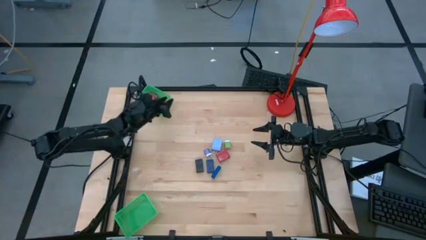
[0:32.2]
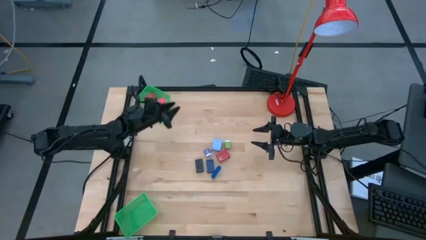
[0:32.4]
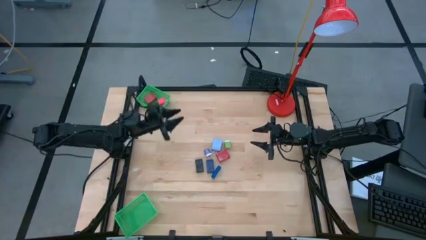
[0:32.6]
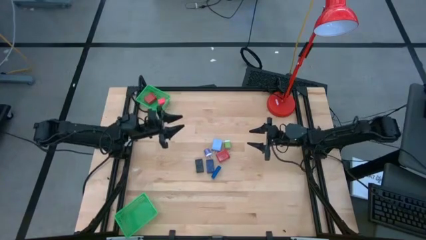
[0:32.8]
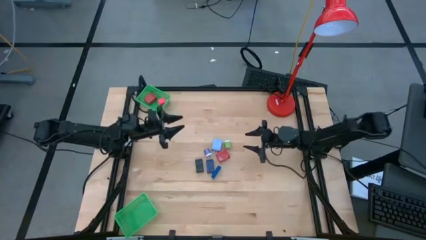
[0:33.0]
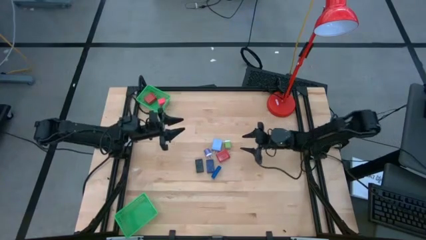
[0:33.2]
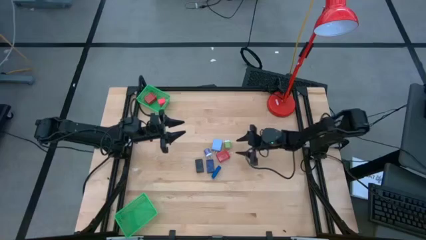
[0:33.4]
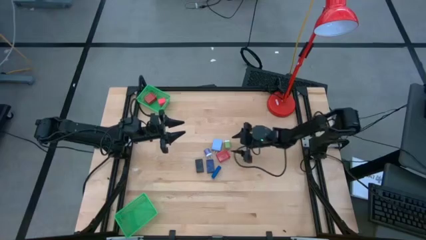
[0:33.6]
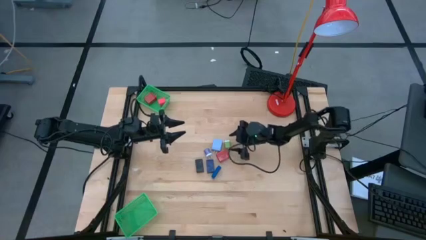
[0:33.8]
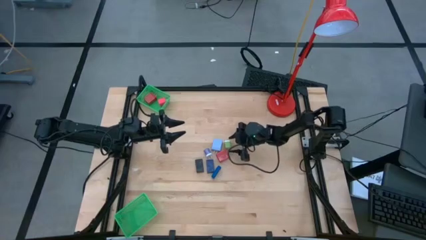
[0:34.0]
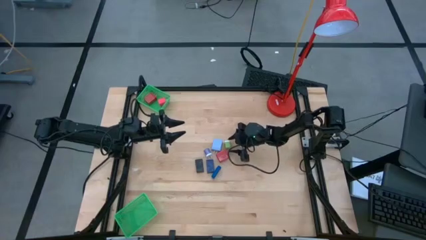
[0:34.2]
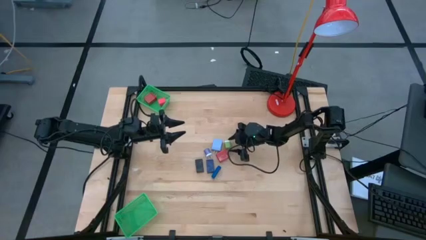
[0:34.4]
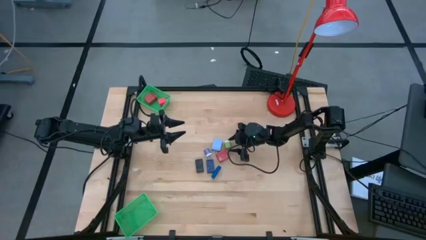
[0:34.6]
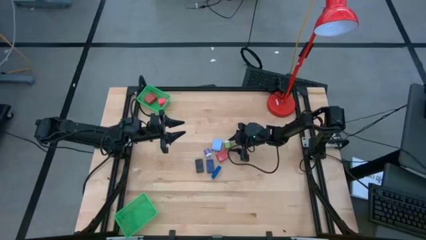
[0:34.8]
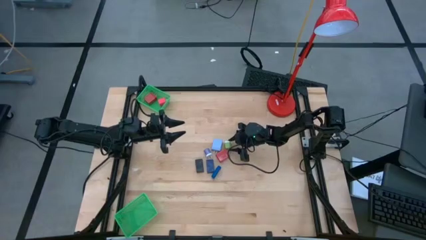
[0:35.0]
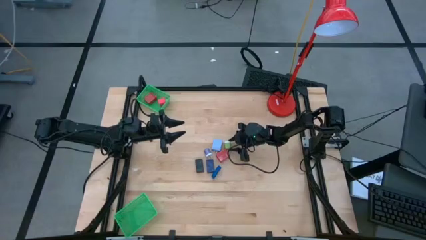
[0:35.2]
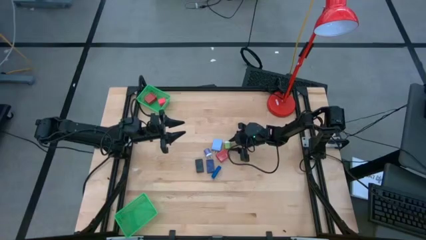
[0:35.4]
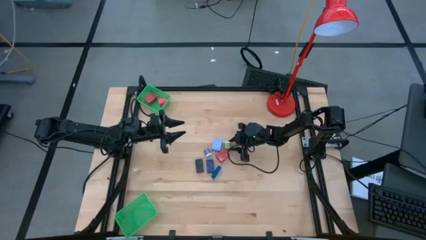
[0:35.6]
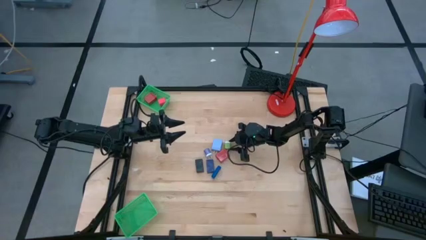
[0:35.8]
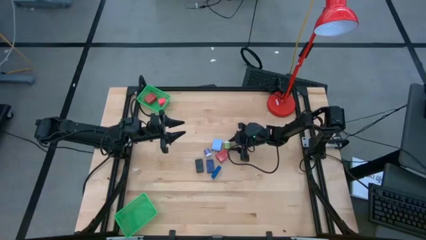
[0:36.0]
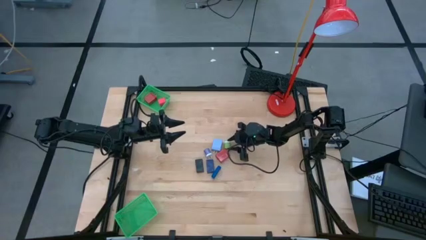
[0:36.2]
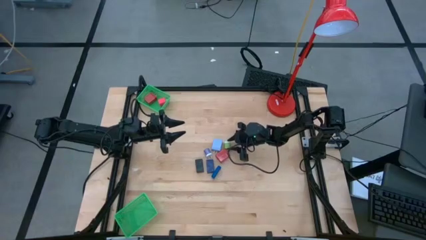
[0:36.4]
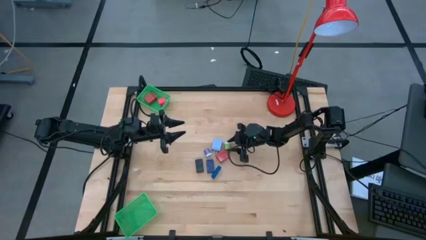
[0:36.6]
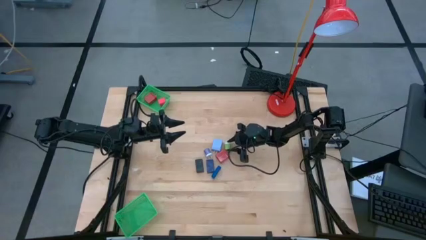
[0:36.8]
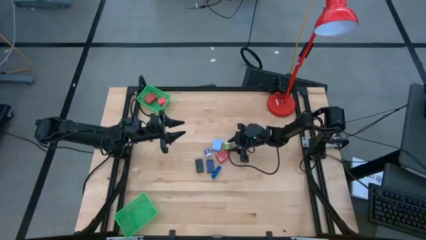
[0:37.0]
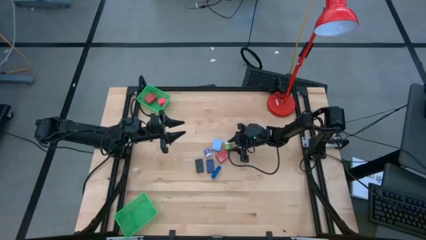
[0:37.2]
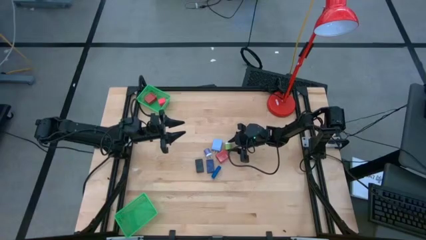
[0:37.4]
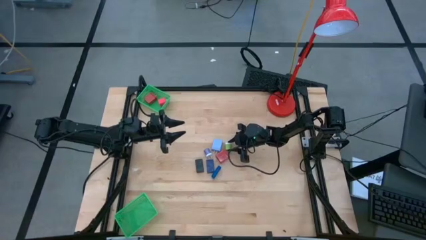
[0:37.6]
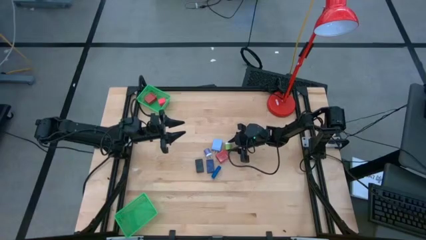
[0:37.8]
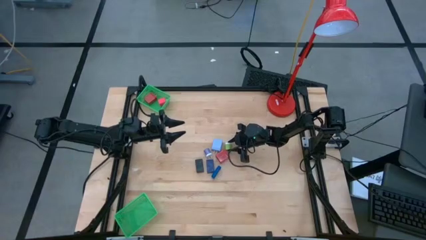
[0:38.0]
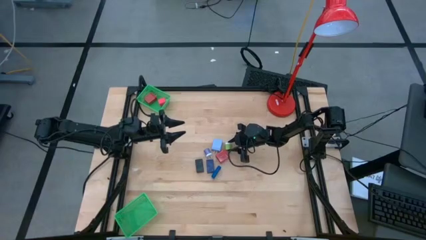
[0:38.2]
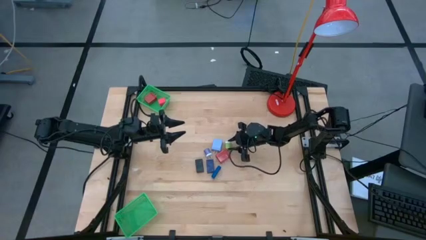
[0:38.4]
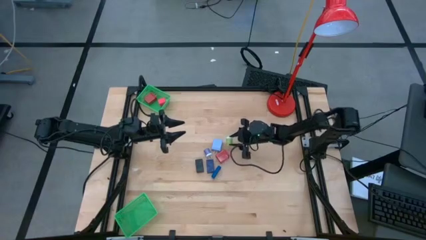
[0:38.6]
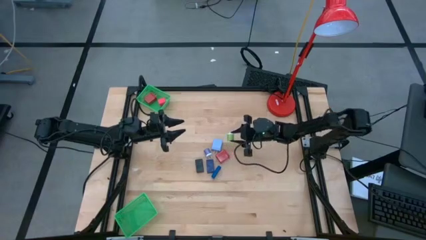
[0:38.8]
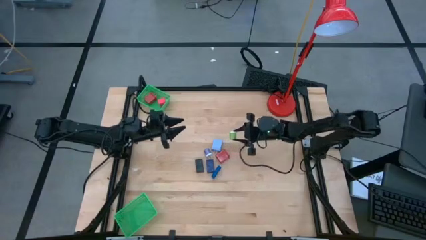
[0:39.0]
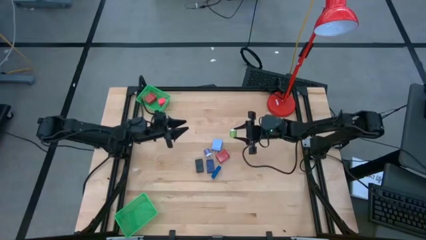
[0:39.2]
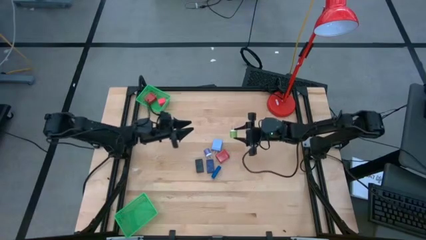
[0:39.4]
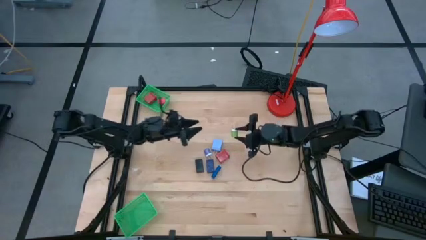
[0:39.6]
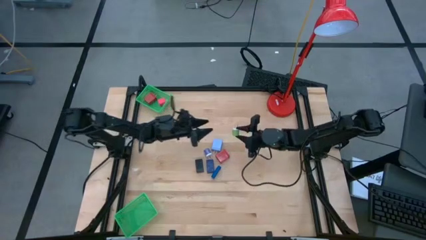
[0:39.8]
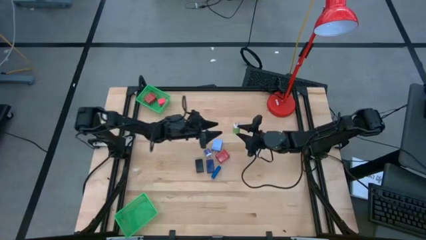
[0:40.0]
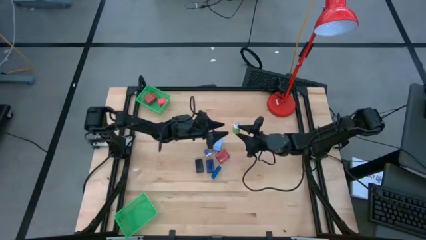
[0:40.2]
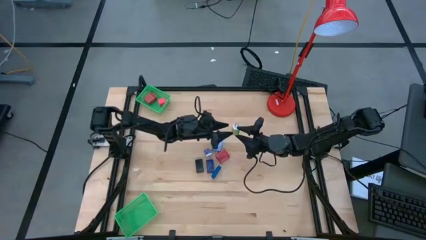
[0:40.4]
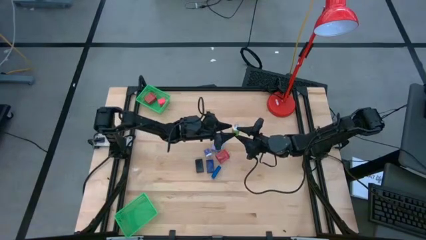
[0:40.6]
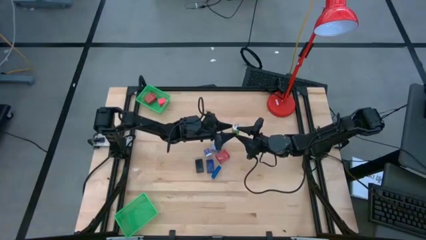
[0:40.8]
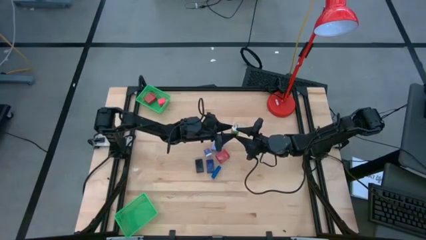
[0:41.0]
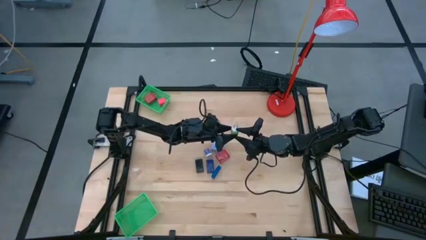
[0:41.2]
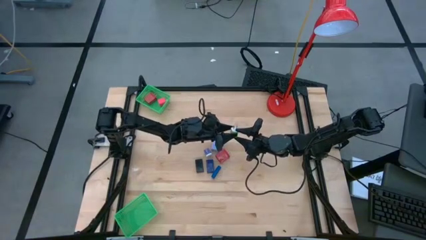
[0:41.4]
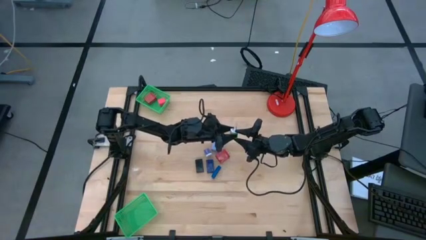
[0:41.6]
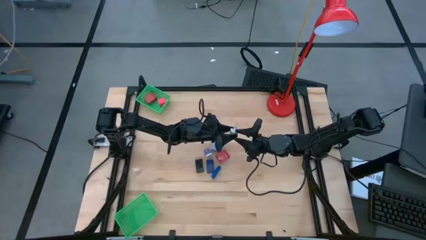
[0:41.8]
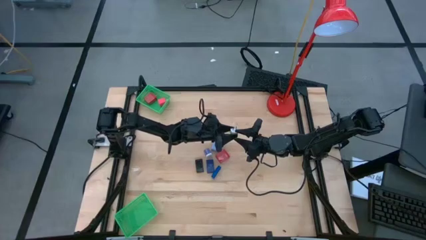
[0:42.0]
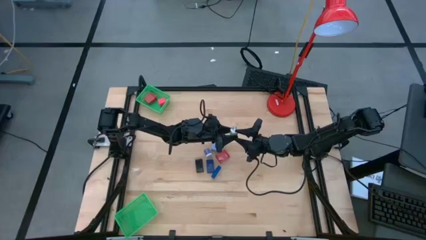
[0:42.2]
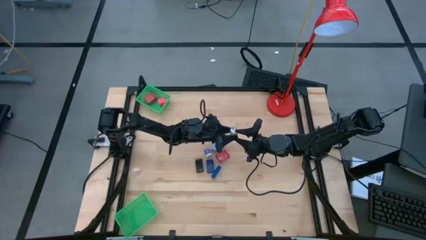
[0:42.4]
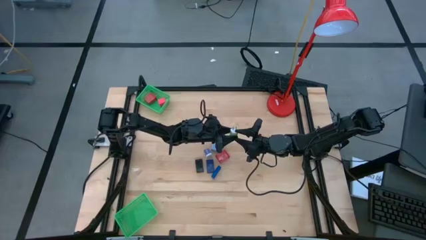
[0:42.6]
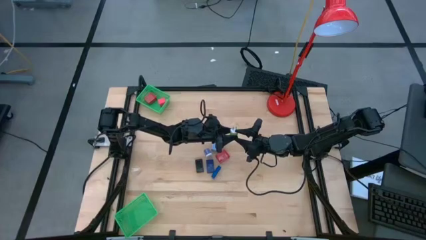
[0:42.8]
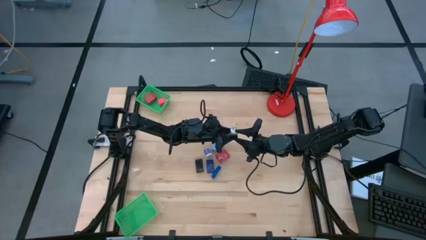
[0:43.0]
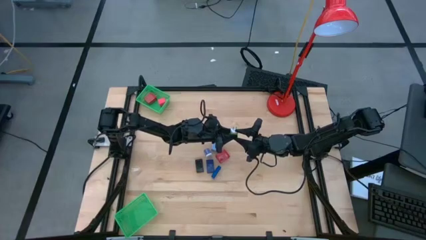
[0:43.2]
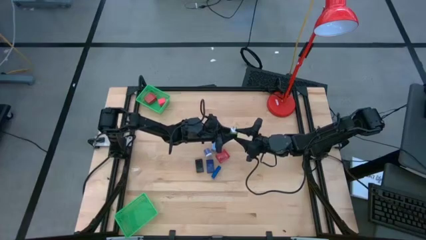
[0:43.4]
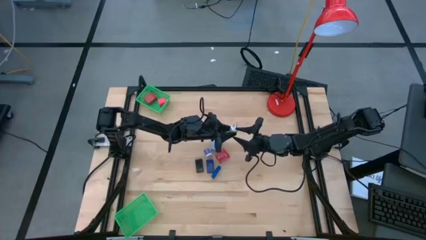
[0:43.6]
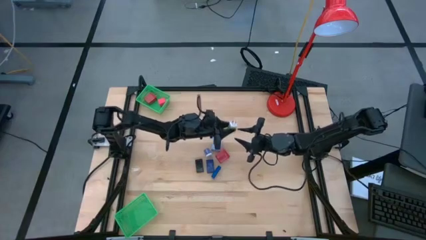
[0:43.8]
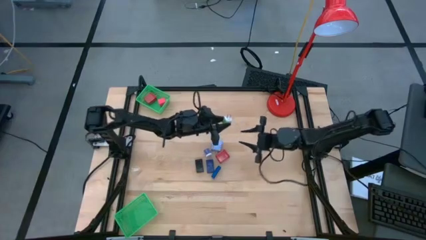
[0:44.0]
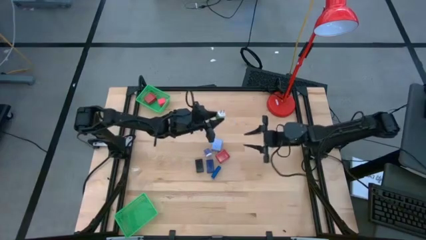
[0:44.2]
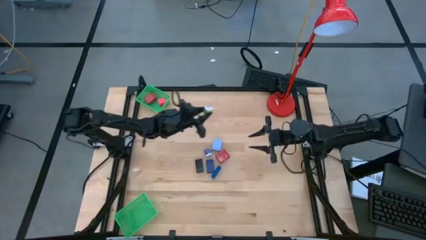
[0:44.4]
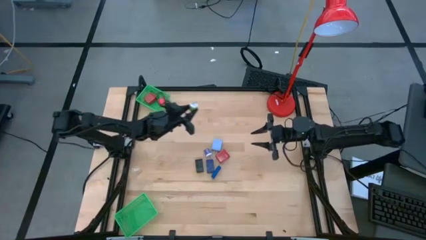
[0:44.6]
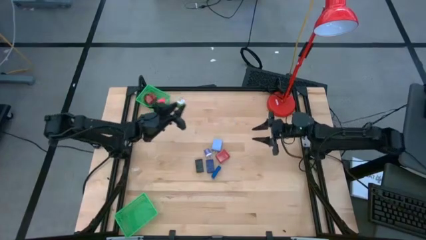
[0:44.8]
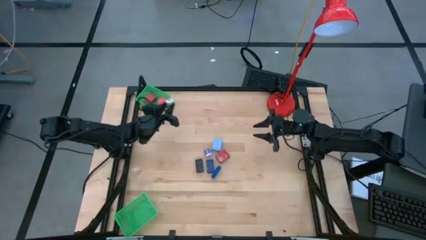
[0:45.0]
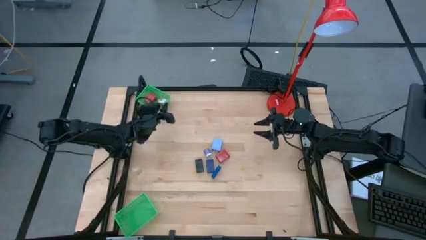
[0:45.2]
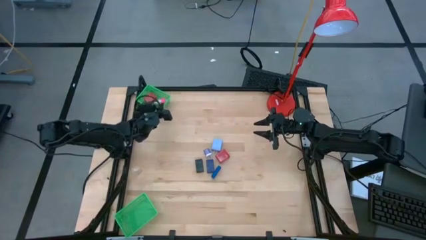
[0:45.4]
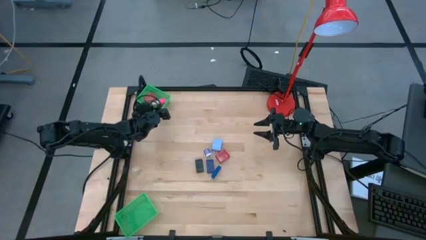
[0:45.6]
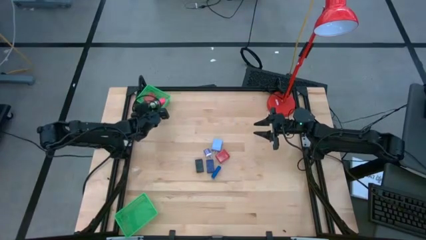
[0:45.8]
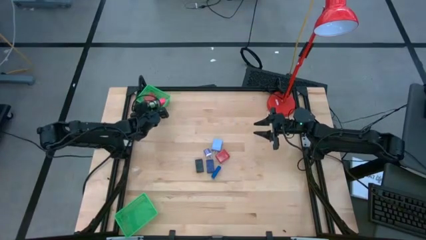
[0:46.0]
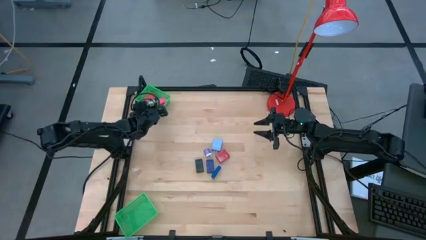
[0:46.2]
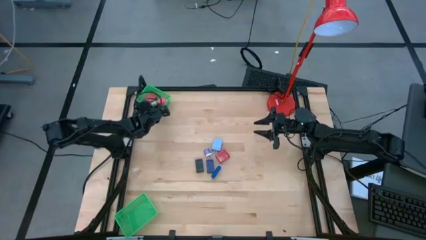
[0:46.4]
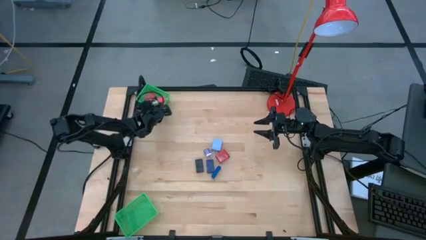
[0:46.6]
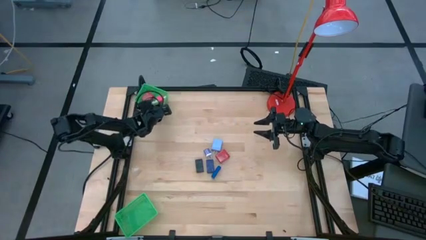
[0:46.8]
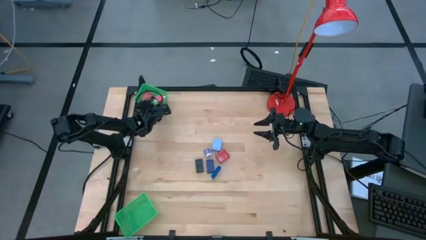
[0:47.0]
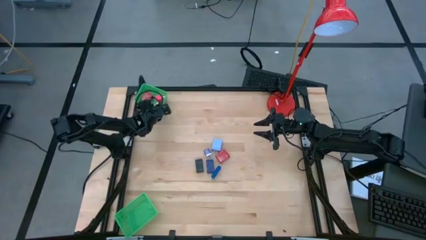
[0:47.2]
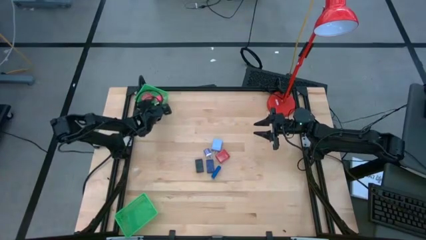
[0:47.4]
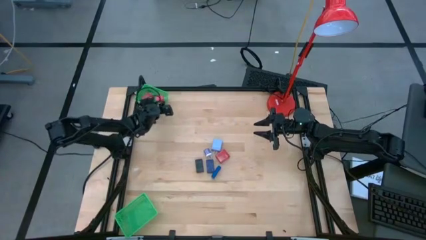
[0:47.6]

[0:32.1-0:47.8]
Task: Pick & Place Office items
Put the green charger adapter into the top green basket
